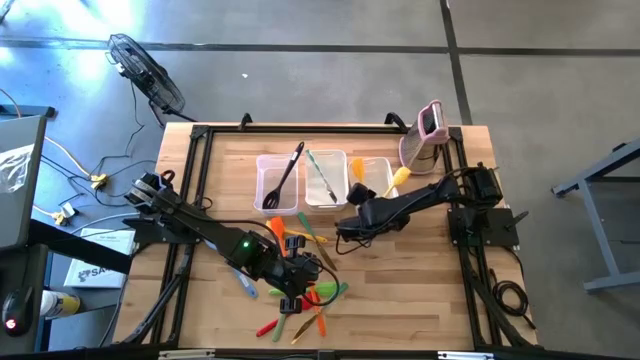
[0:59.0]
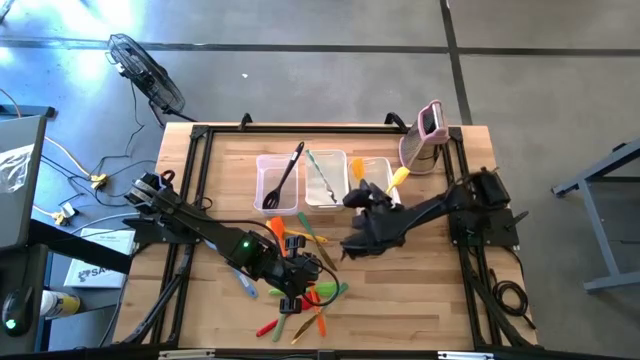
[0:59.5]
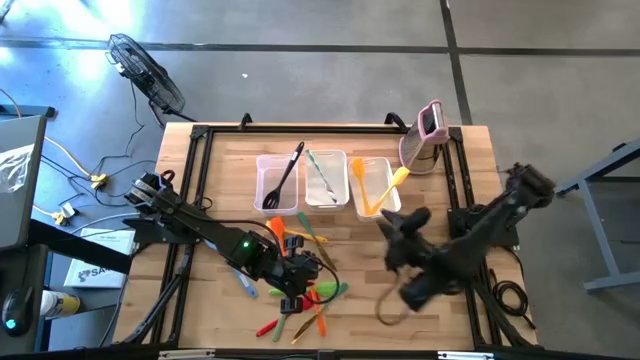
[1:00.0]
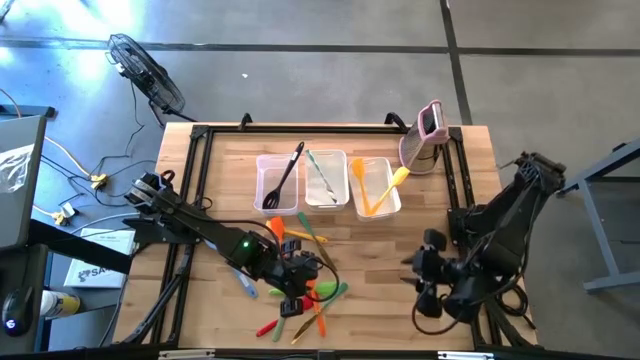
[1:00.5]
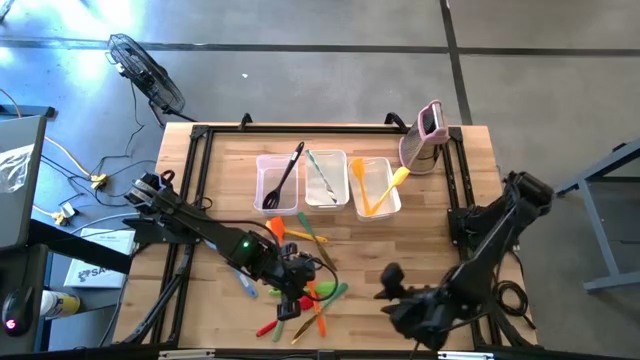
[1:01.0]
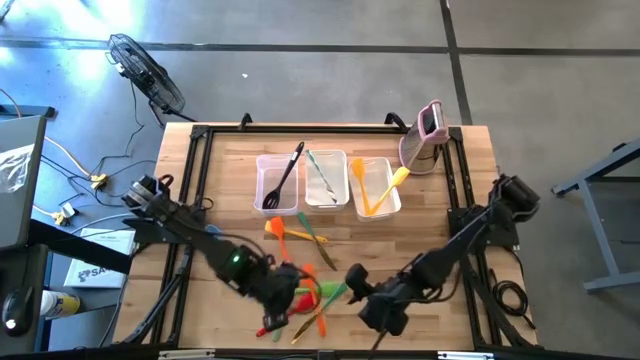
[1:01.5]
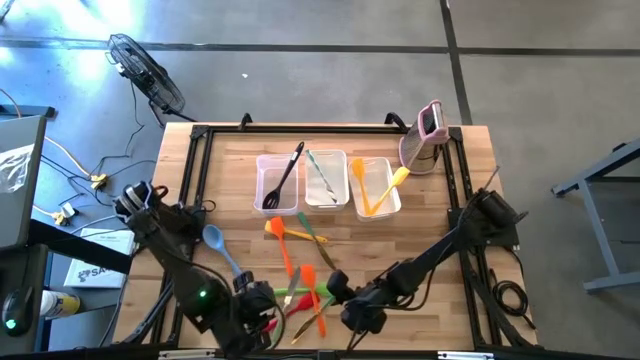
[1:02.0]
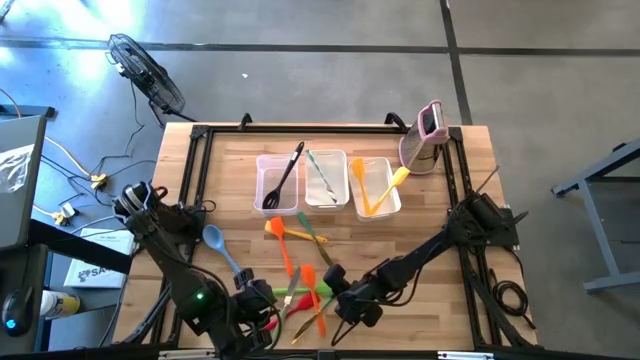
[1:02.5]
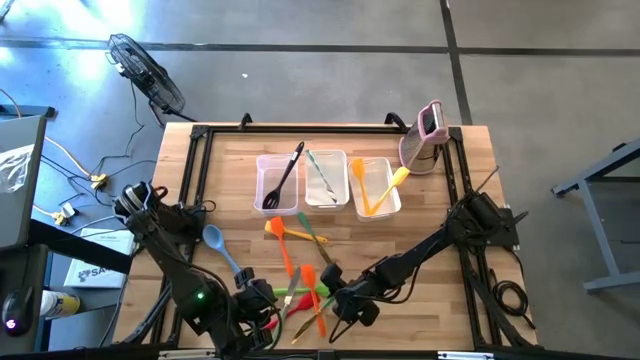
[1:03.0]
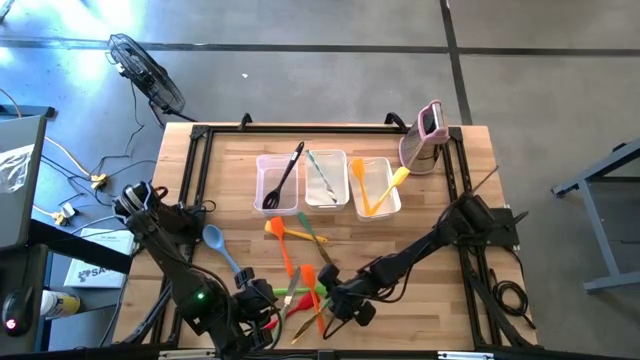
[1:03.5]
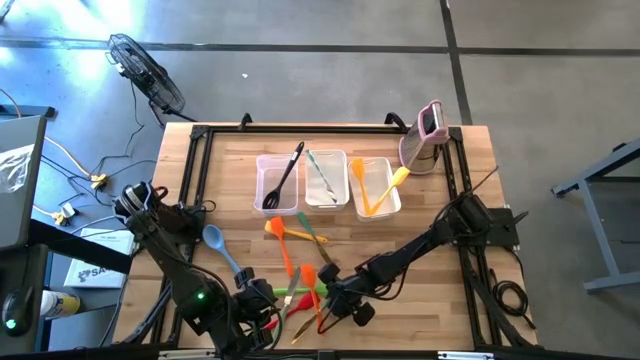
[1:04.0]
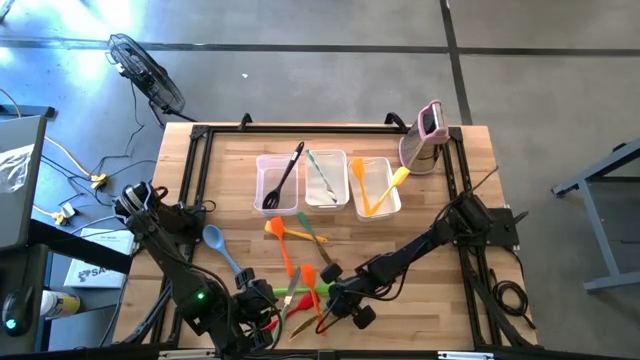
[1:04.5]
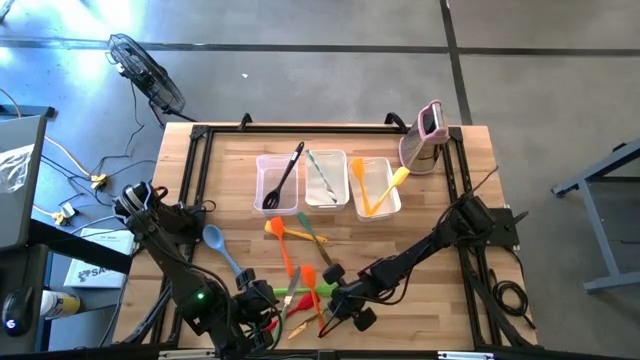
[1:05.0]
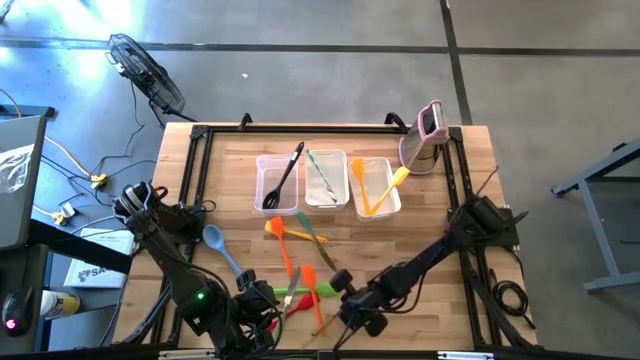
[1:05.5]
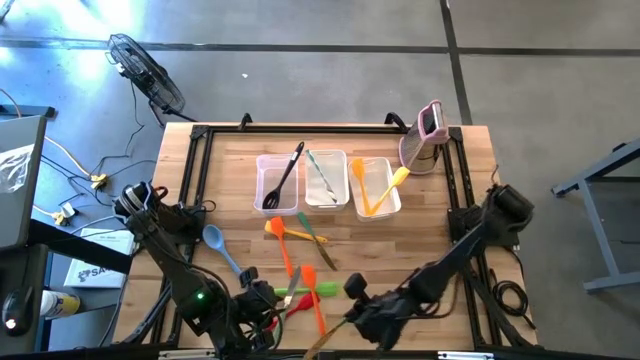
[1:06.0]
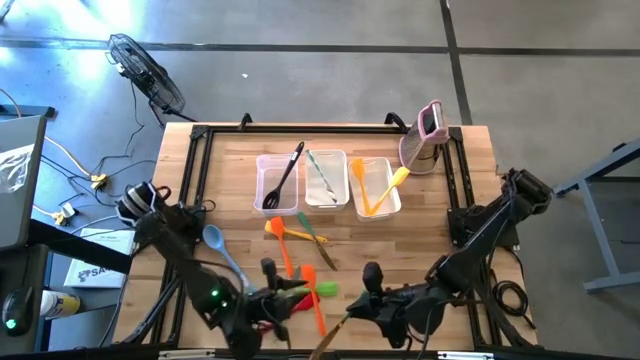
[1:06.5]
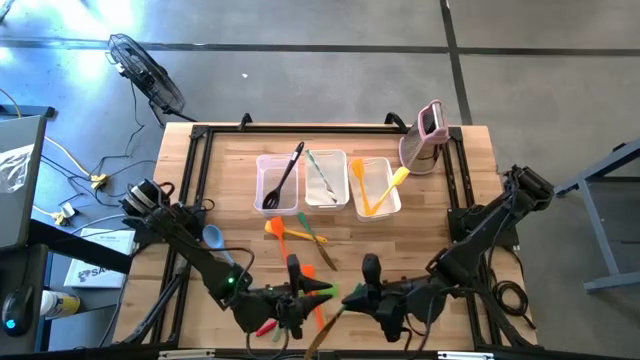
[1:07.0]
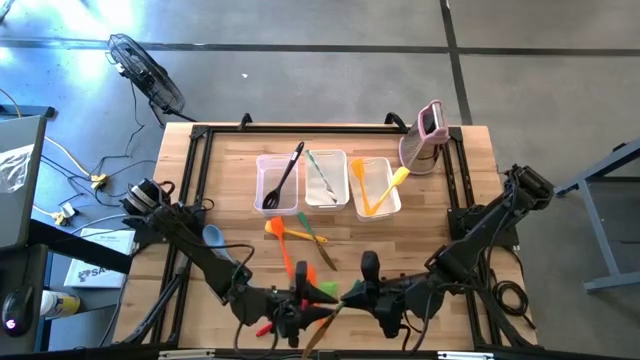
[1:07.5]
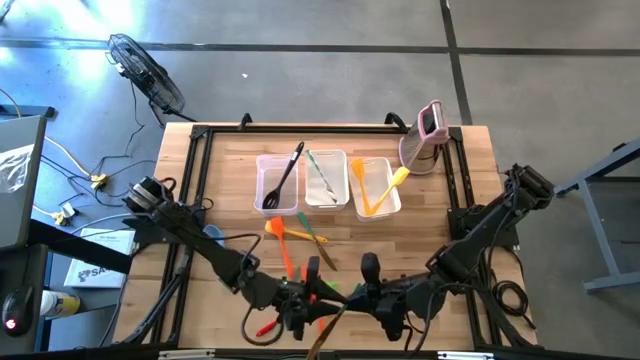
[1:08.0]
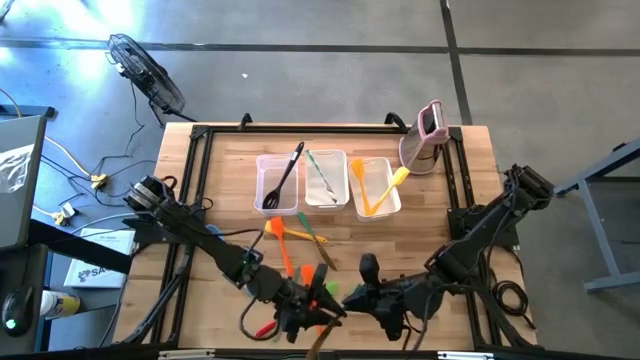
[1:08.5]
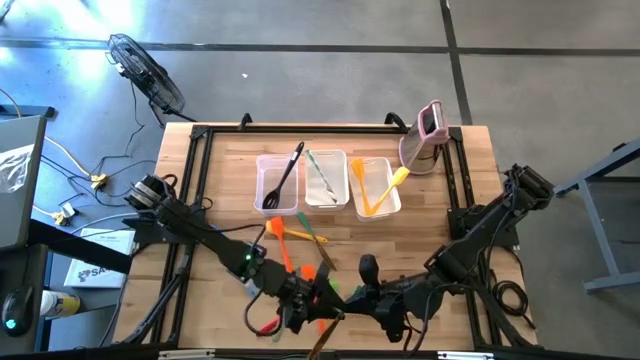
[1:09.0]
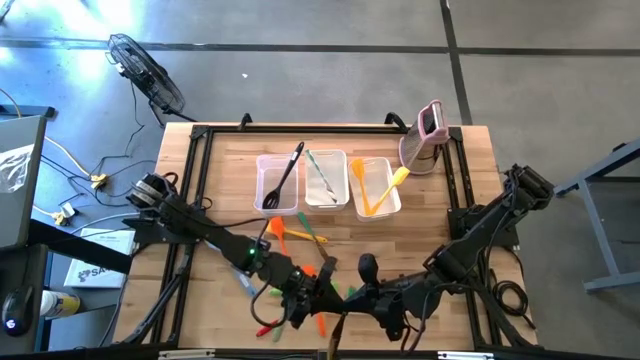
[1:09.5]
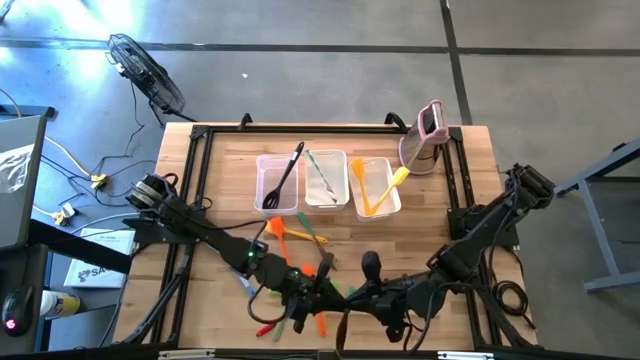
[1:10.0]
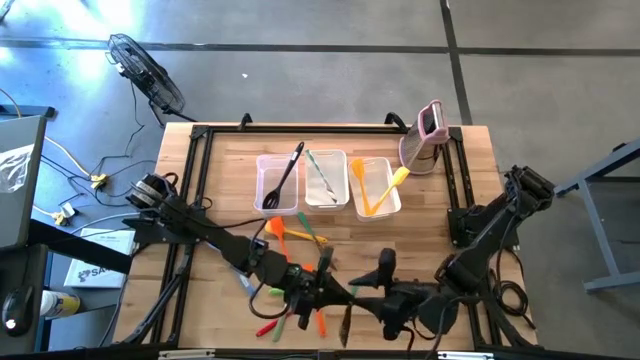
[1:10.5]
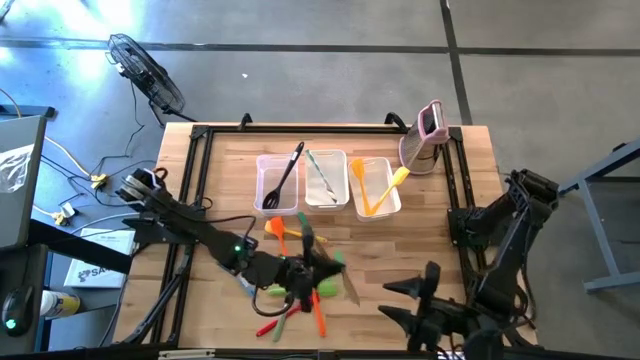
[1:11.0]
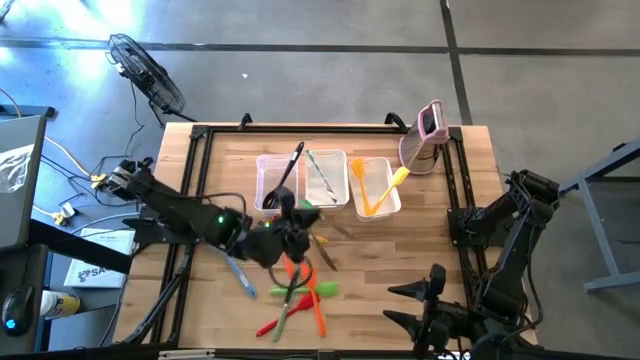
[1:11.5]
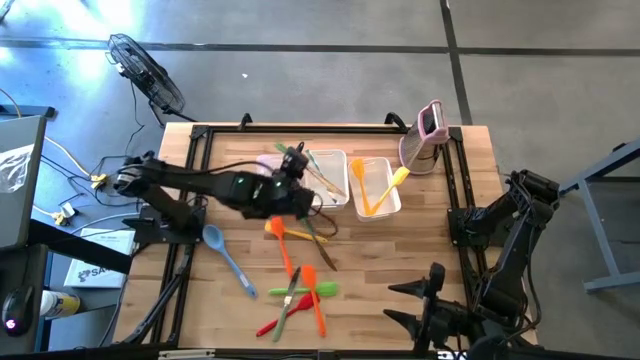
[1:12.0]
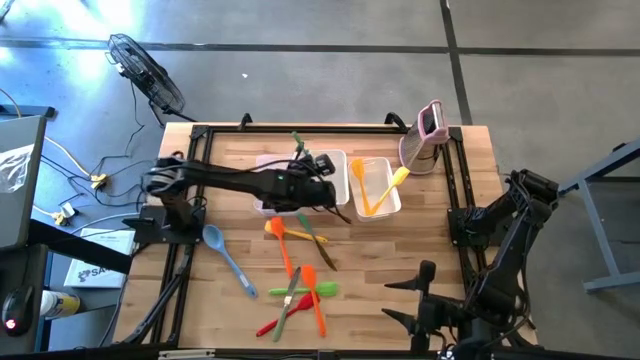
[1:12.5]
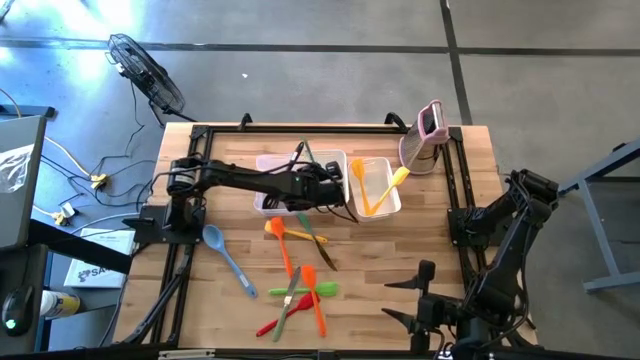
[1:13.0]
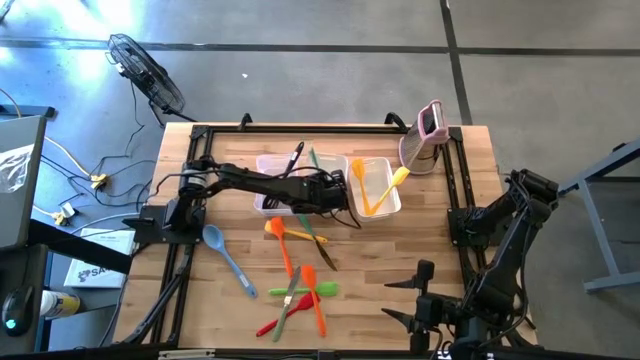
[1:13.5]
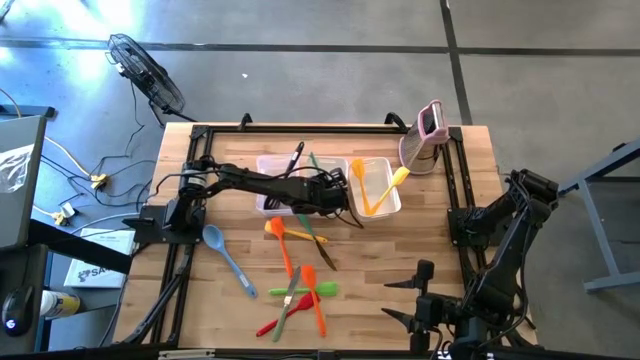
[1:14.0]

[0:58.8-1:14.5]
Task: Pick & Place Kitchen Items
Put the bottom green knife into the left white bin

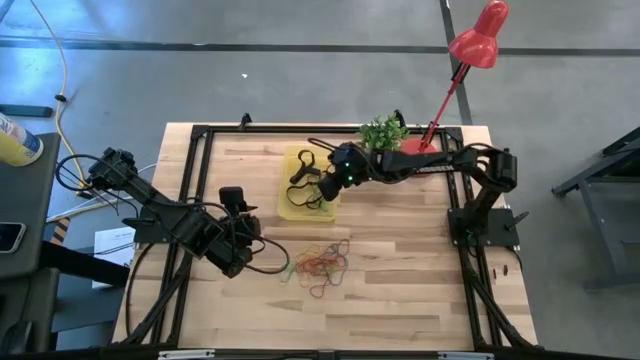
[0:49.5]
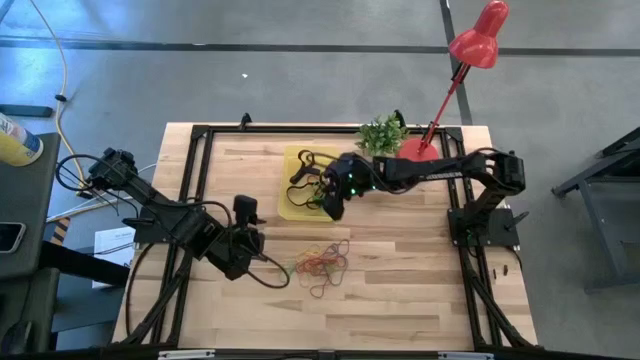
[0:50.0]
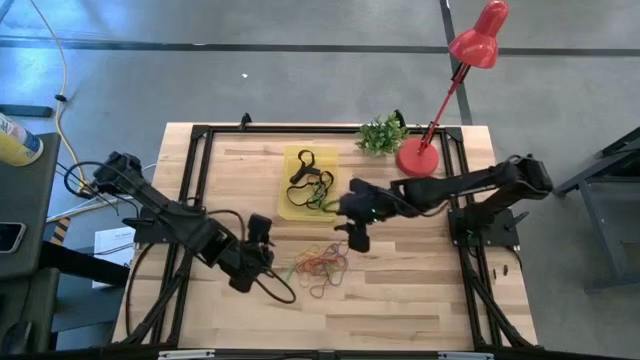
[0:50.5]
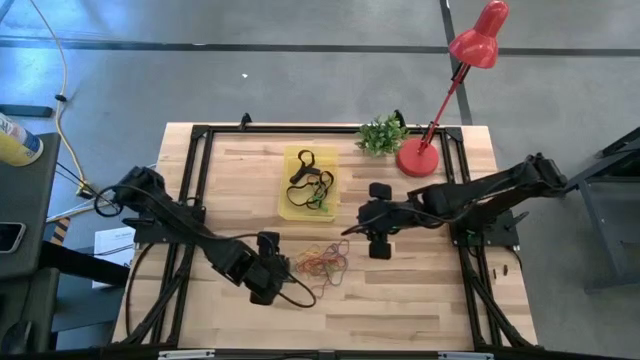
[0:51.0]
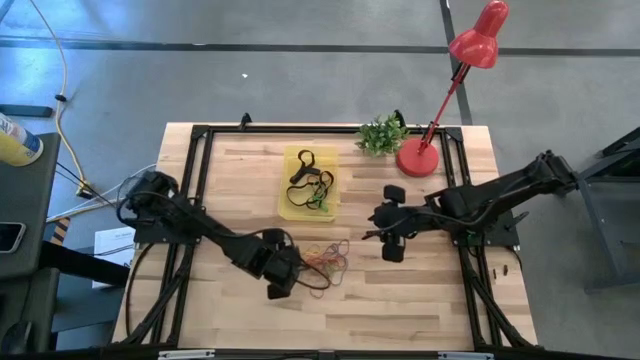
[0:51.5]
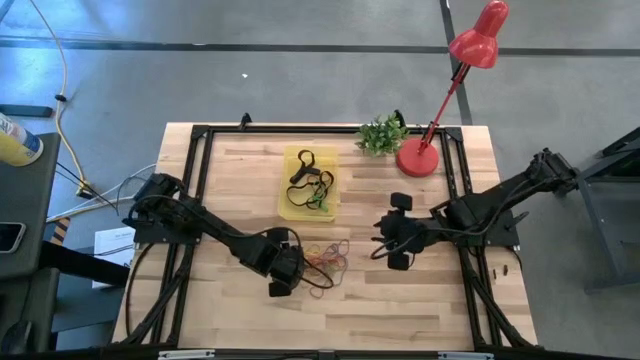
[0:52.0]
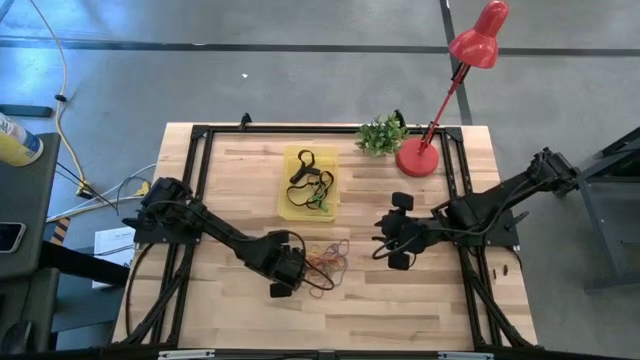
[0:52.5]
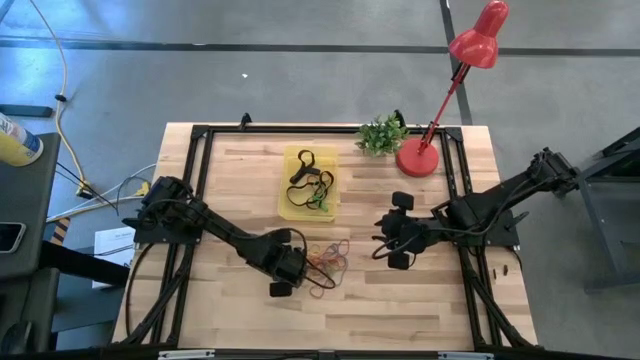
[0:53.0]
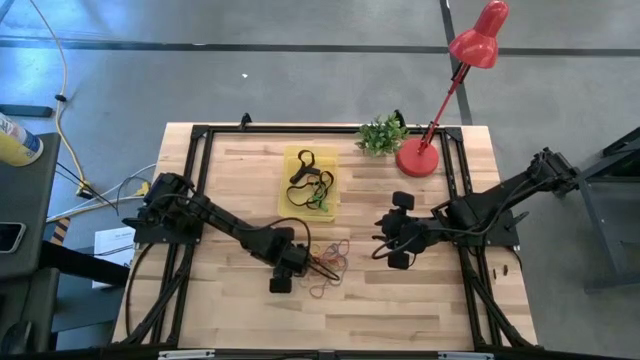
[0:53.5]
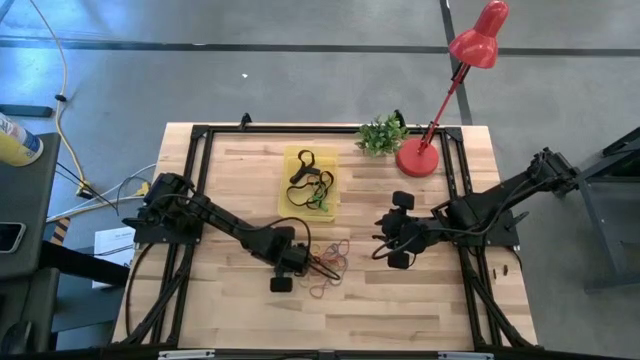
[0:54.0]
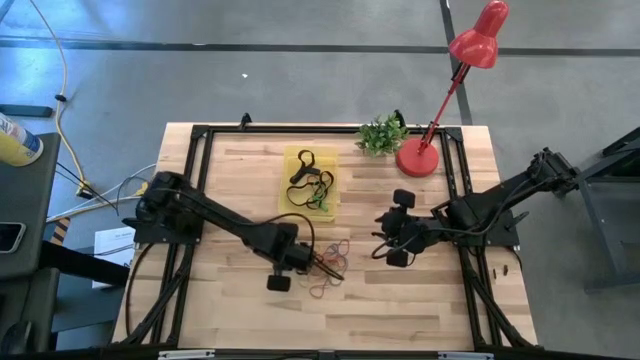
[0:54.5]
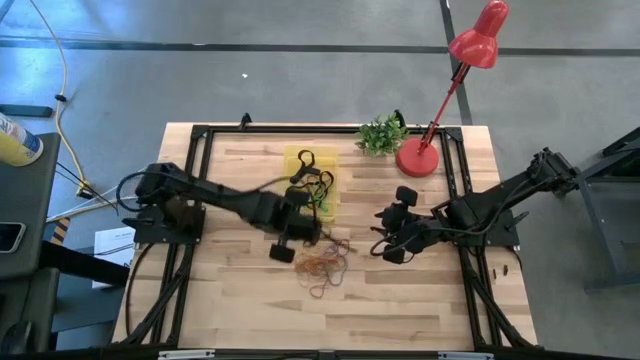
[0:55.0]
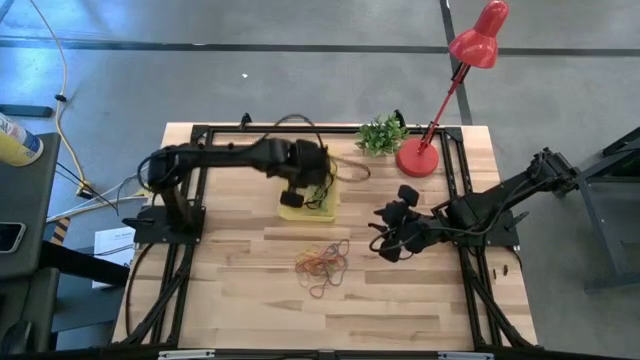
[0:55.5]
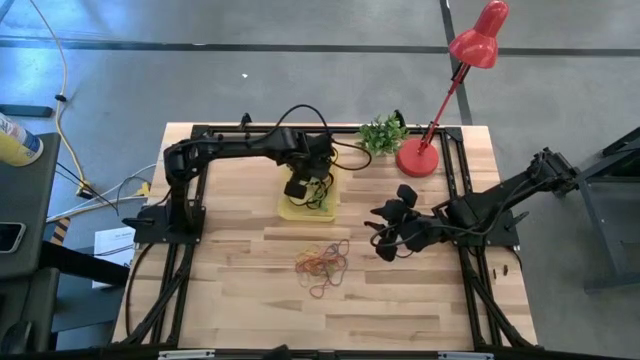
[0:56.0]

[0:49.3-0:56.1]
Task: Pick and place rubber bands into bin
Put the green rubber band into the yellow bin
